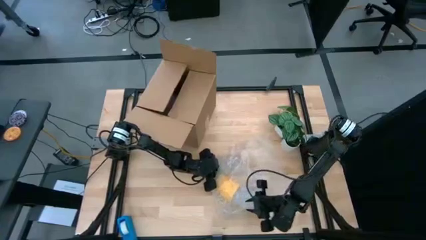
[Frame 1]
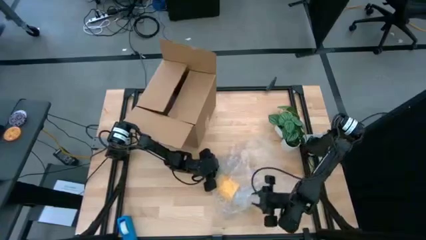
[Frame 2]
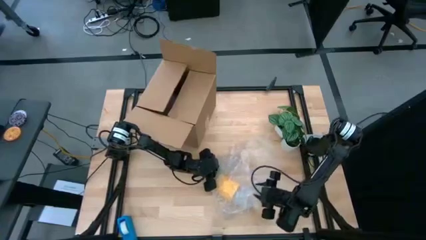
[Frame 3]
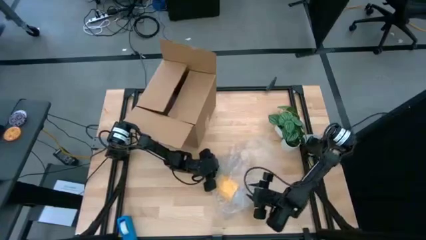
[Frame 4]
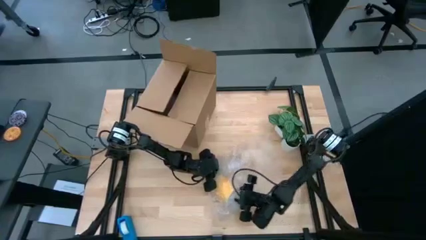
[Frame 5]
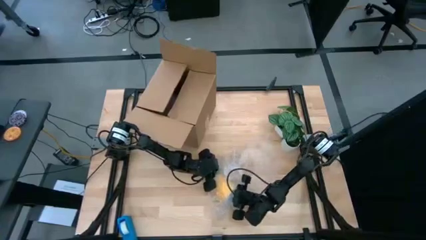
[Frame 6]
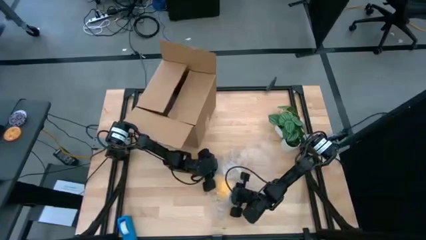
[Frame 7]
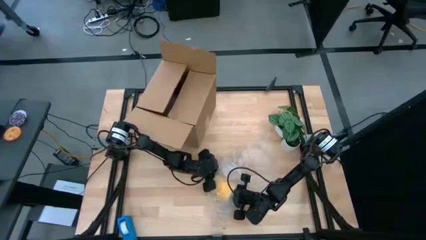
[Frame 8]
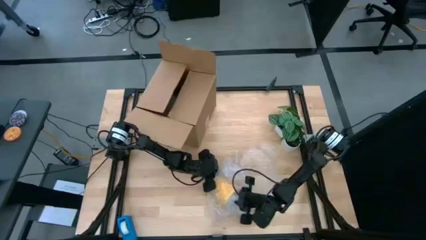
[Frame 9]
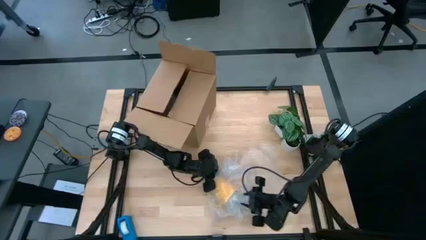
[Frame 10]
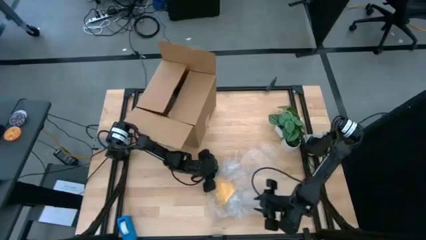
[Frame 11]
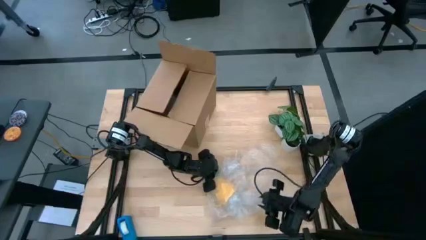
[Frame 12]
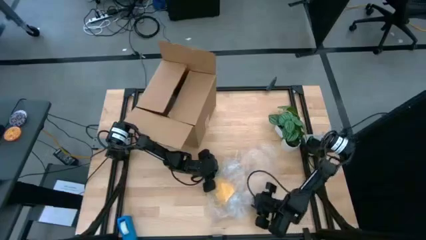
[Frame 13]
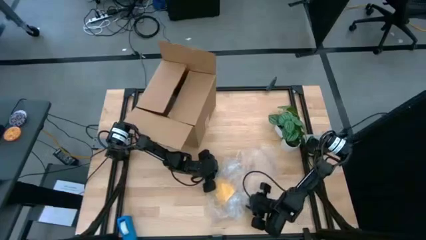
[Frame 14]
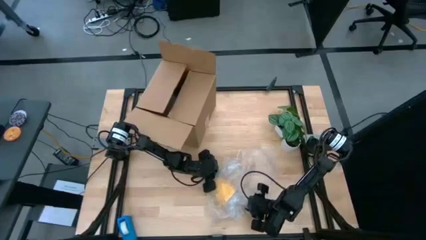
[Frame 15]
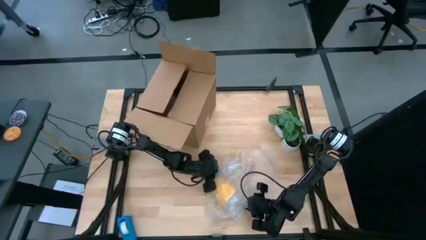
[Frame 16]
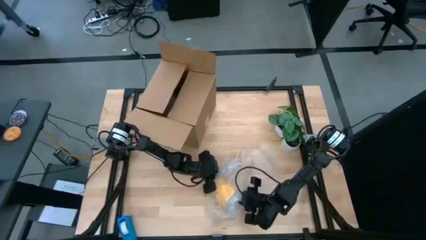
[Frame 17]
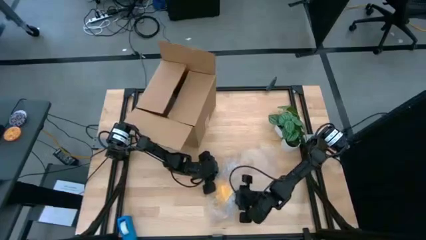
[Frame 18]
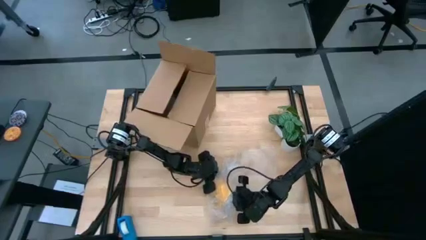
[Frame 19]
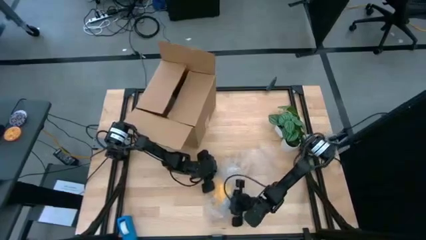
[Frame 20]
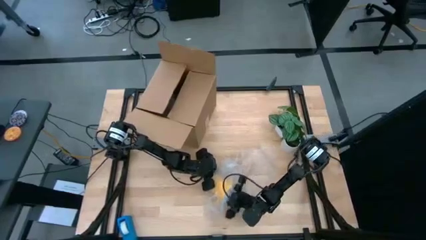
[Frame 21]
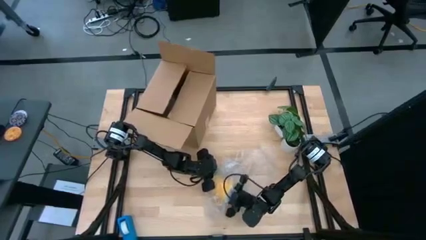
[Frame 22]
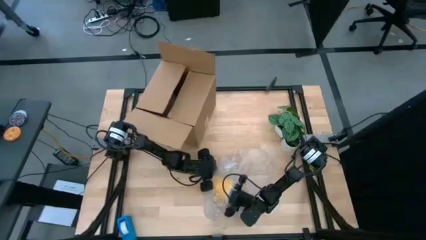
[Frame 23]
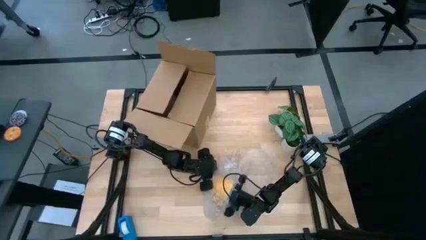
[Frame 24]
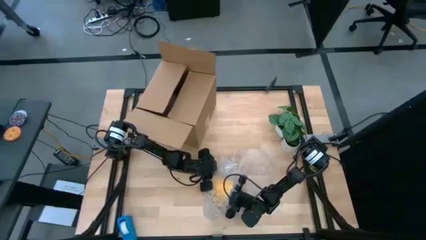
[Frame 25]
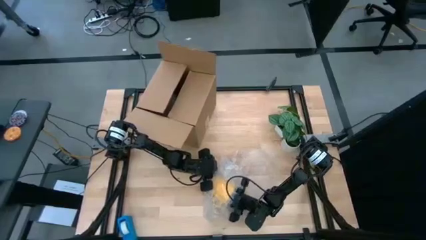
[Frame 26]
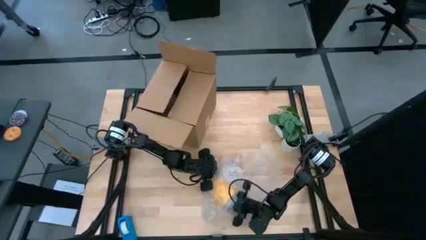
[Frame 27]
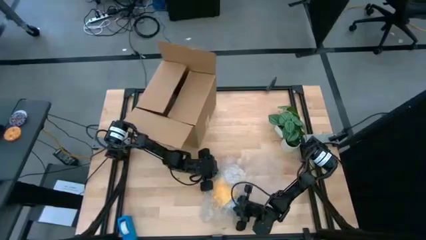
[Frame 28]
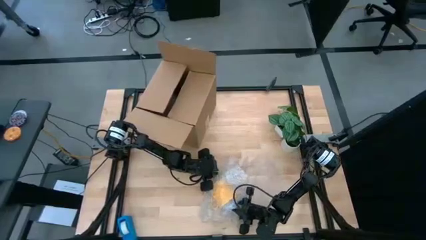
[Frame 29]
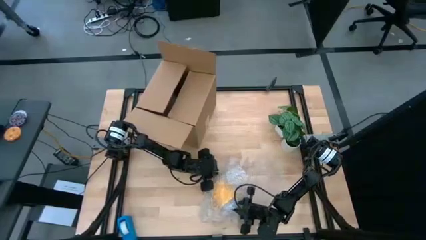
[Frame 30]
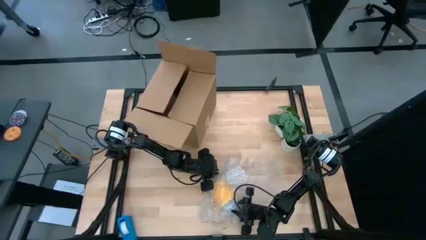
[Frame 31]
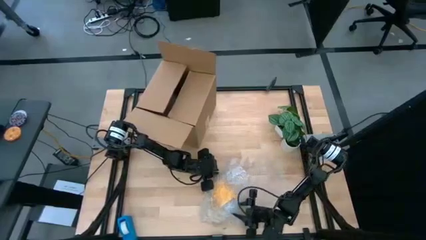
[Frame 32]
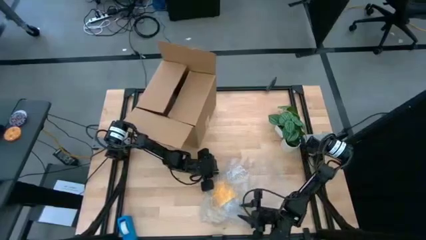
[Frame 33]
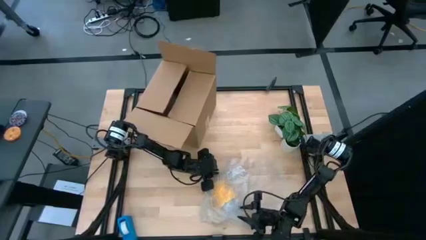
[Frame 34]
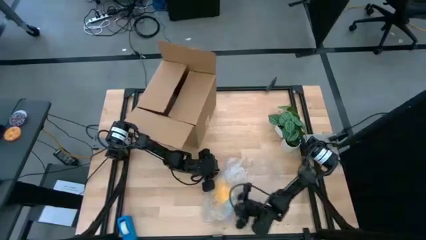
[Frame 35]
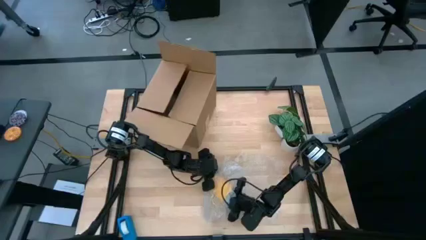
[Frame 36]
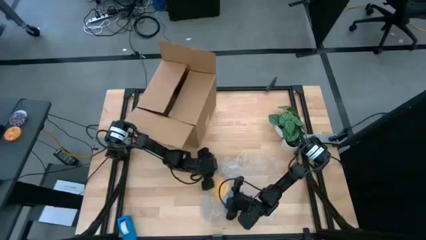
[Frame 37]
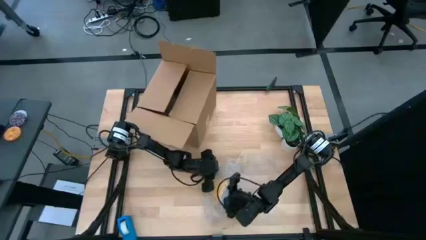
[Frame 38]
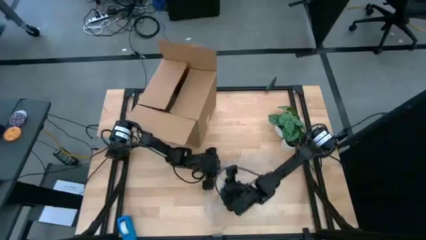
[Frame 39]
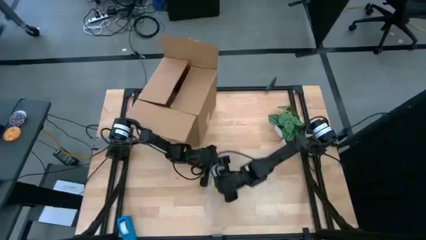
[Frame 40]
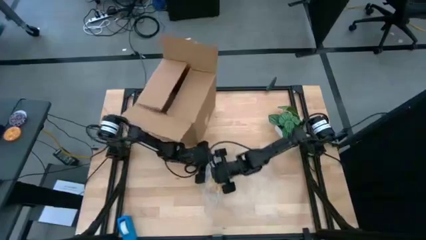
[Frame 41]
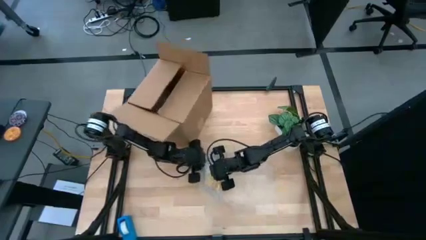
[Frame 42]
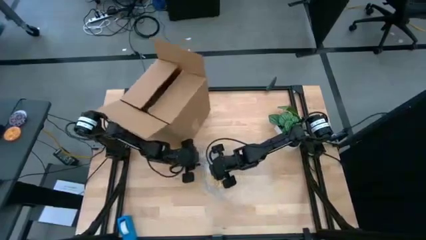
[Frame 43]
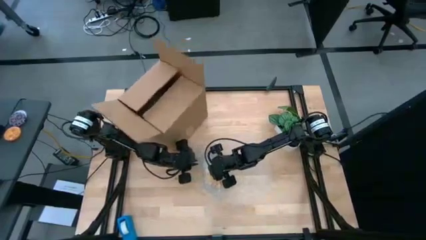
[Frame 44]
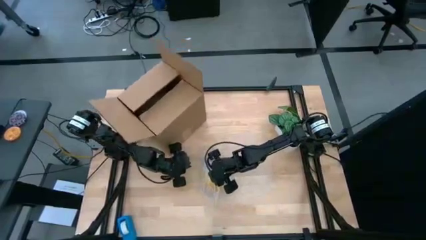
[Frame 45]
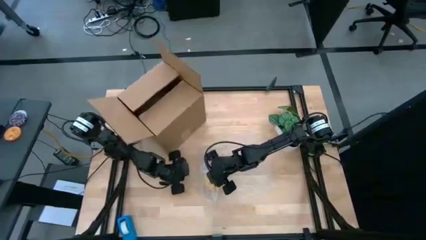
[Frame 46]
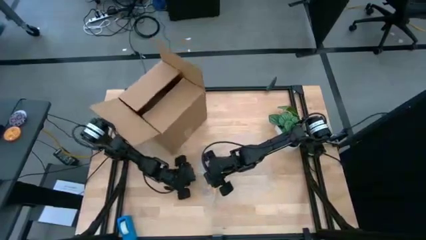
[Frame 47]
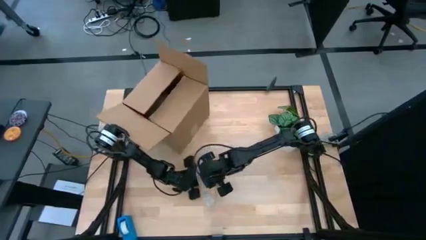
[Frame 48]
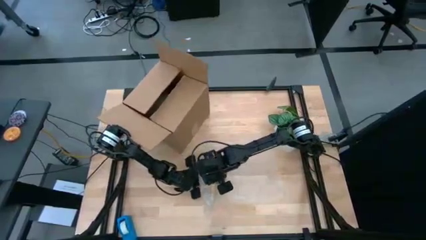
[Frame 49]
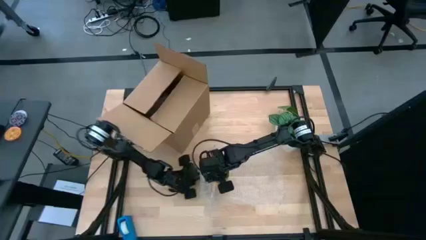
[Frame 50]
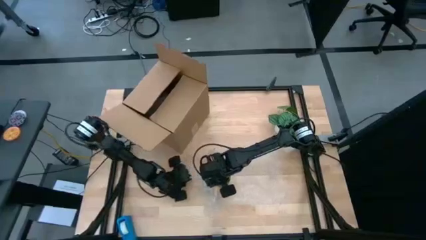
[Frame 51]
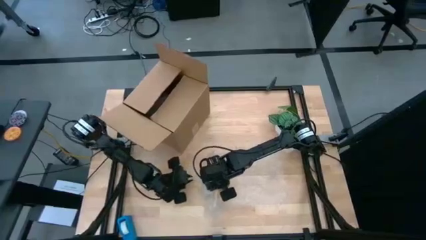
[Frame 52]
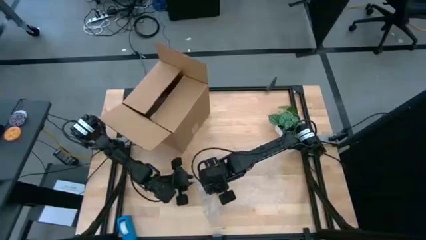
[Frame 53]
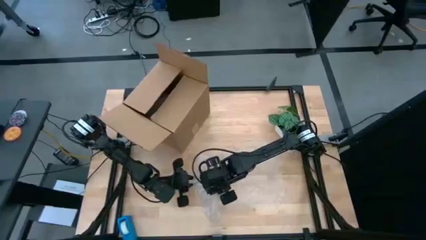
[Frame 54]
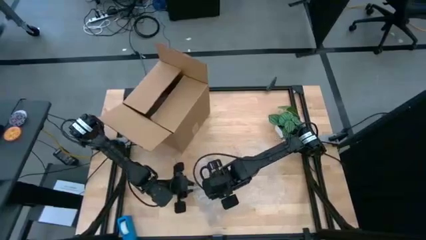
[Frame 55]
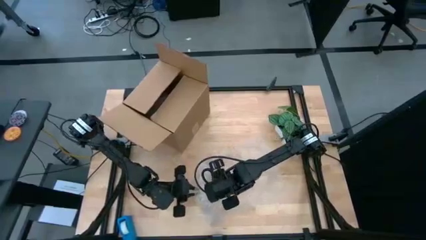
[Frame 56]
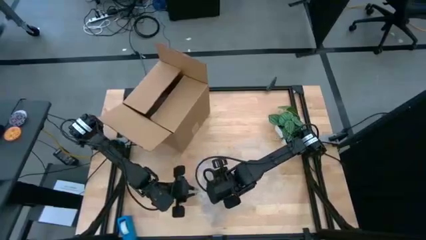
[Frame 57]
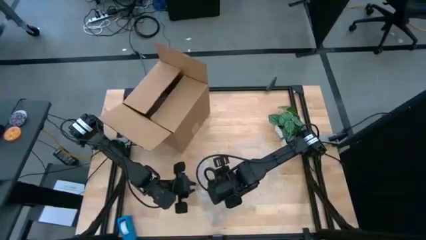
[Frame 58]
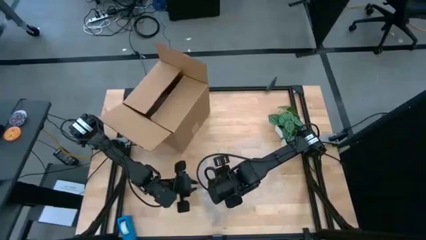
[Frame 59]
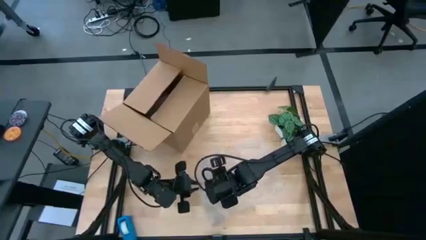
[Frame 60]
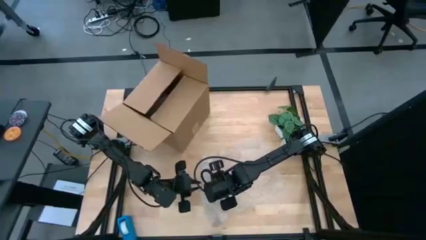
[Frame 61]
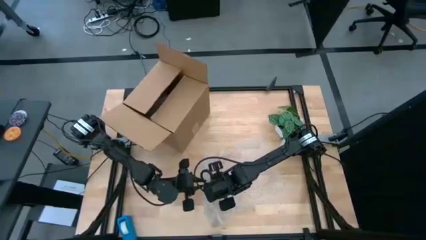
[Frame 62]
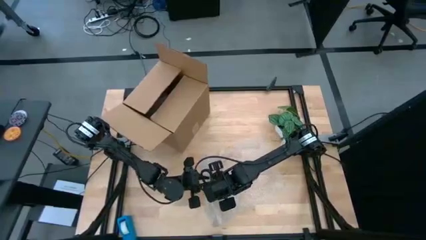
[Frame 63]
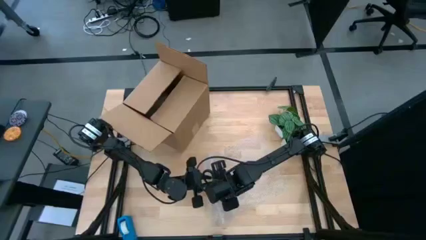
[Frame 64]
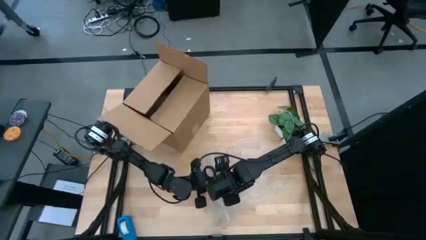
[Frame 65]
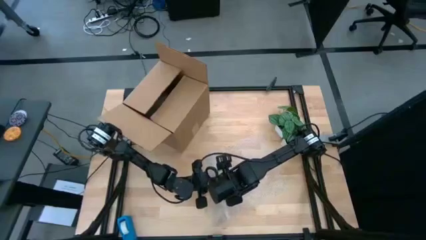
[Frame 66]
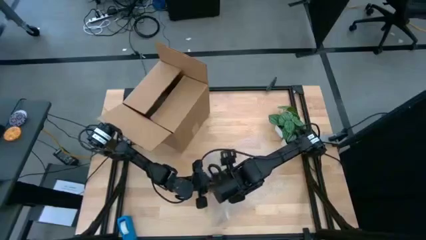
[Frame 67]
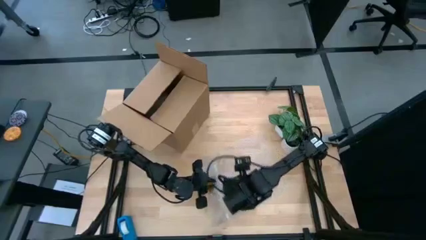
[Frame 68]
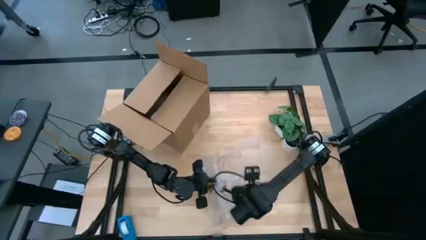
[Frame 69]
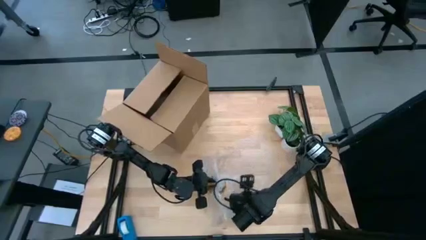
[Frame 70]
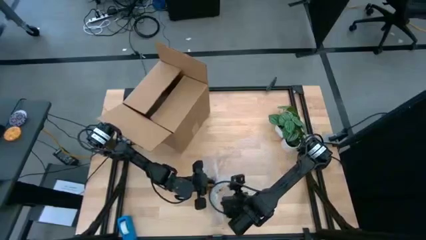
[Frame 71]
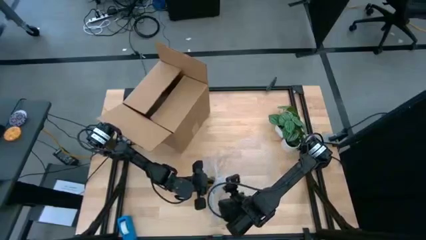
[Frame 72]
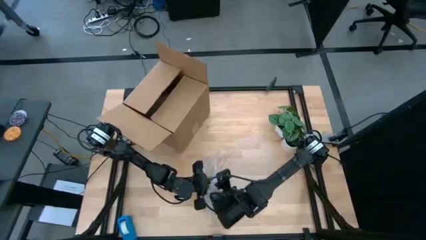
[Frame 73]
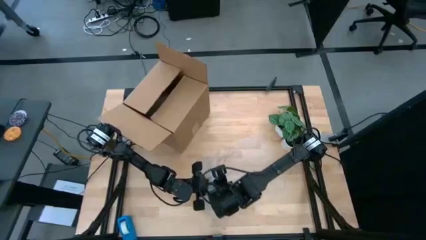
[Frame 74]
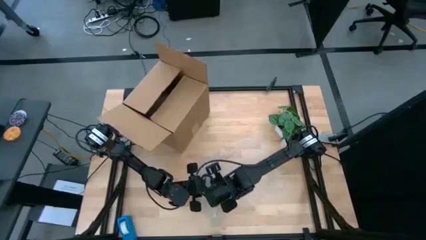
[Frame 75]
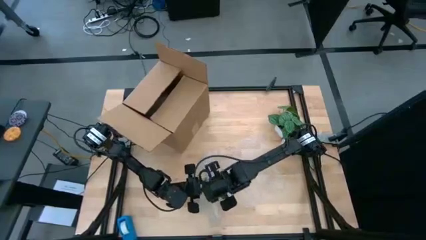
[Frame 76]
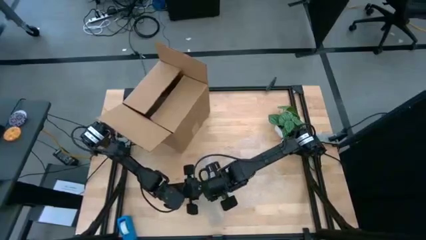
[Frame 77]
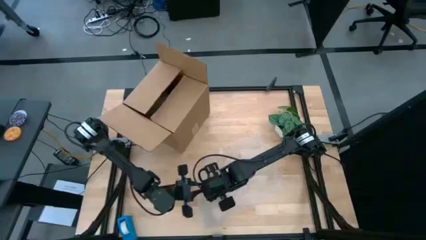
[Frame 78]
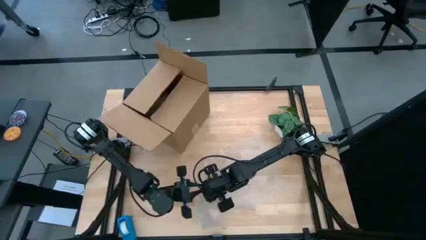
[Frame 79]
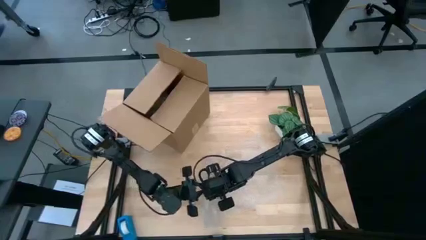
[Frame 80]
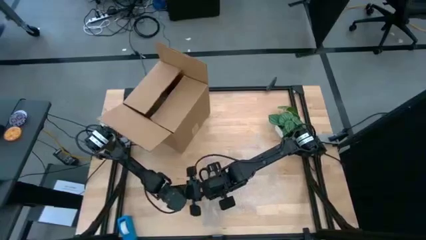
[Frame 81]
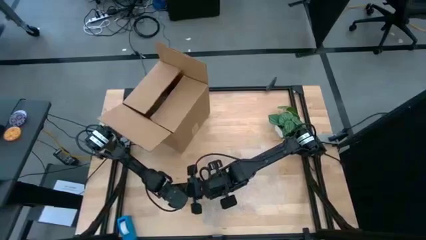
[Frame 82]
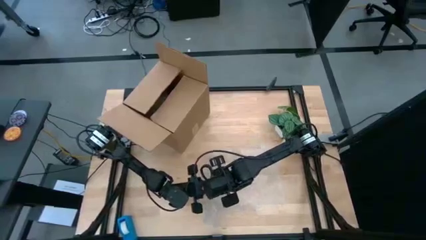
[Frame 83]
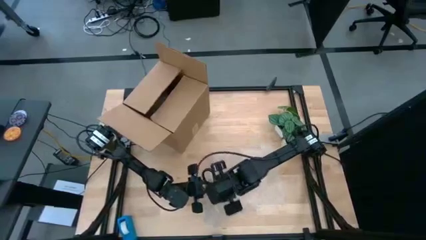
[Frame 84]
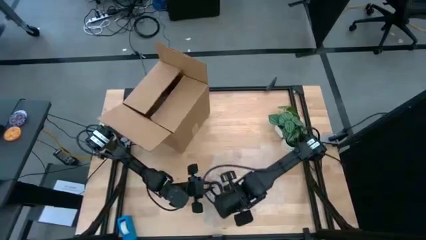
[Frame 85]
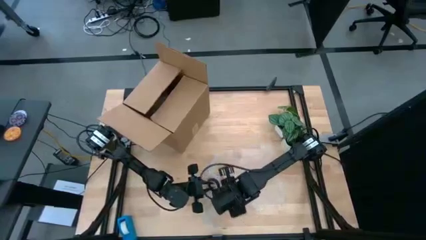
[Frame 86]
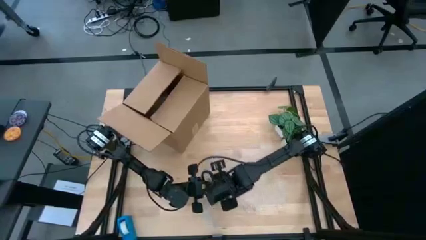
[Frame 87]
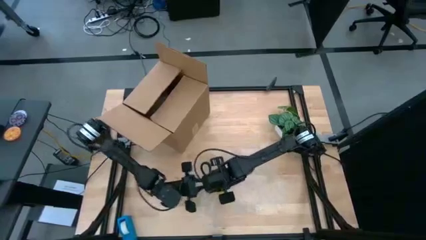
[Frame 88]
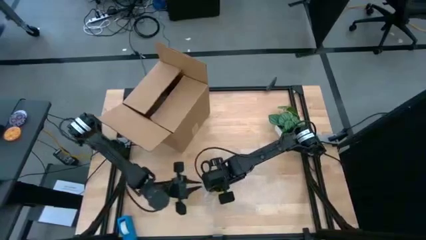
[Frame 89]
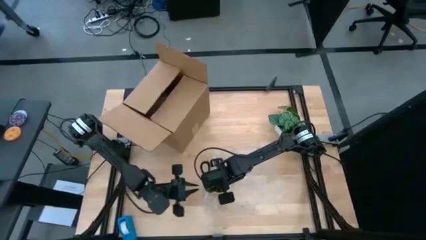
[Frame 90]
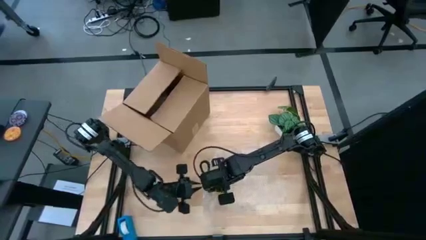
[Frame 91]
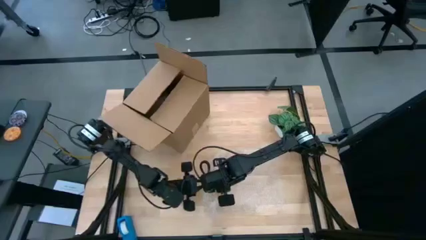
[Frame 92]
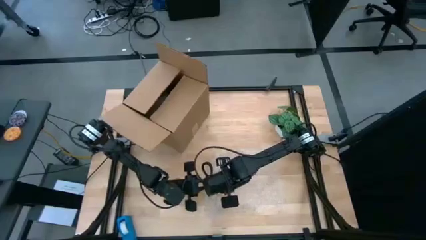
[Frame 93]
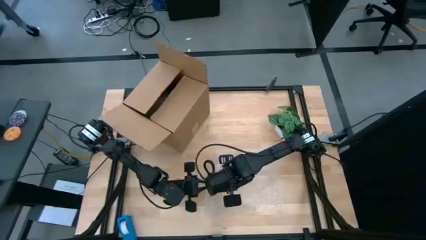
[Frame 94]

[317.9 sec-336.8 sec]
Task: wrap mug
Wrap the yellow mug with the bubble wrap
